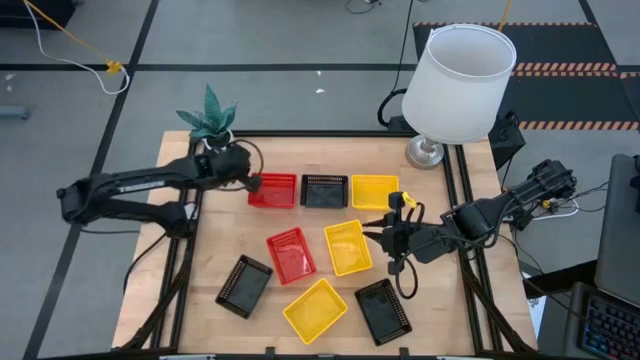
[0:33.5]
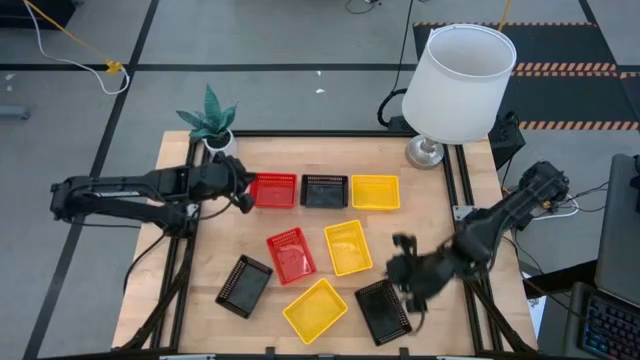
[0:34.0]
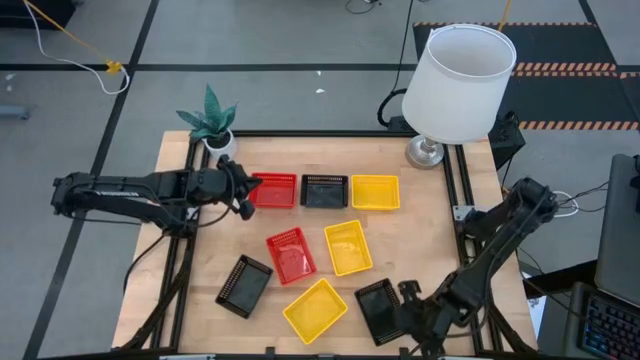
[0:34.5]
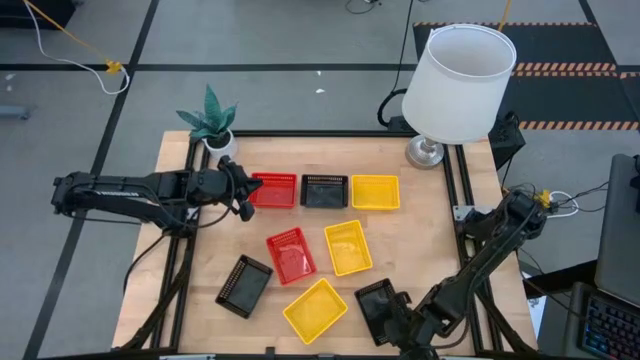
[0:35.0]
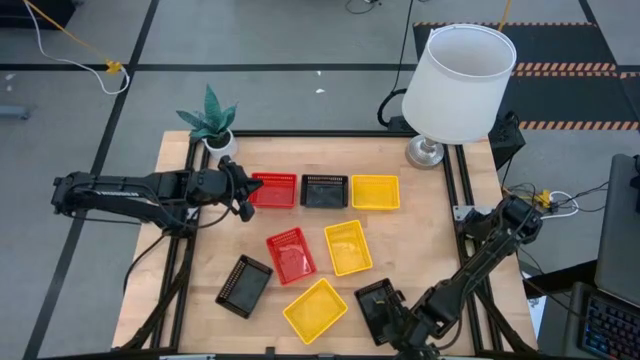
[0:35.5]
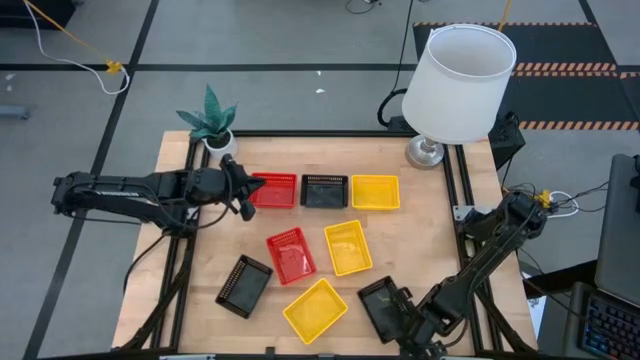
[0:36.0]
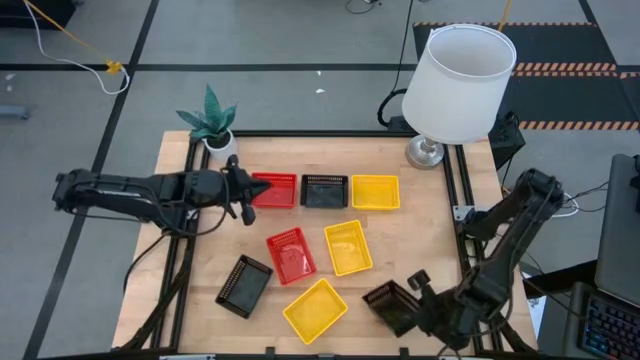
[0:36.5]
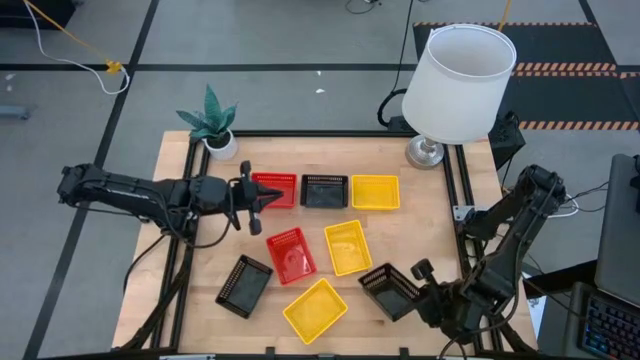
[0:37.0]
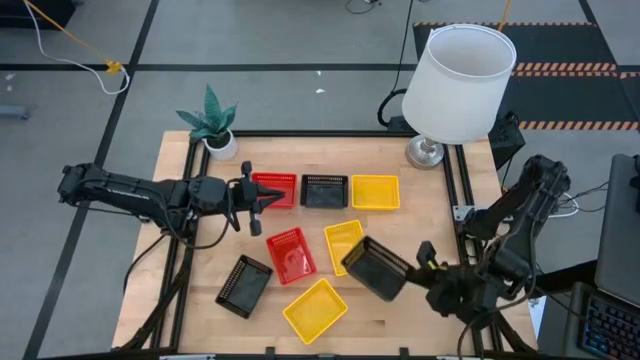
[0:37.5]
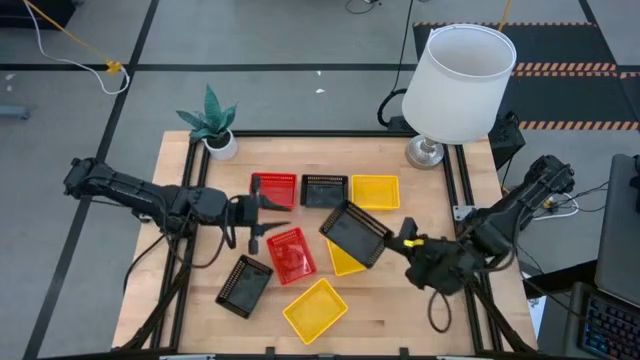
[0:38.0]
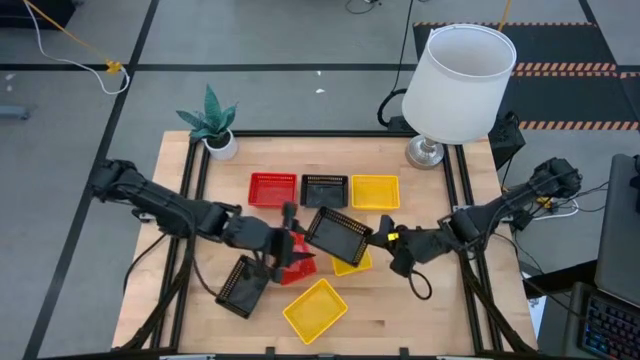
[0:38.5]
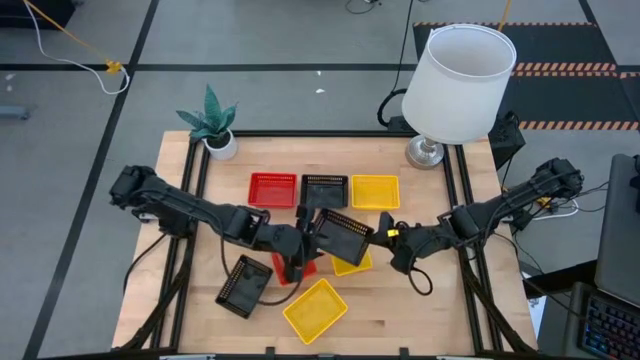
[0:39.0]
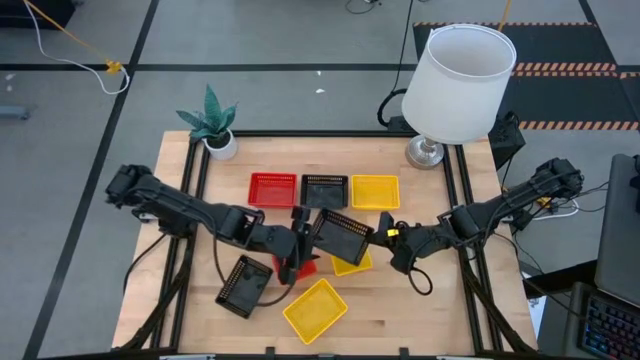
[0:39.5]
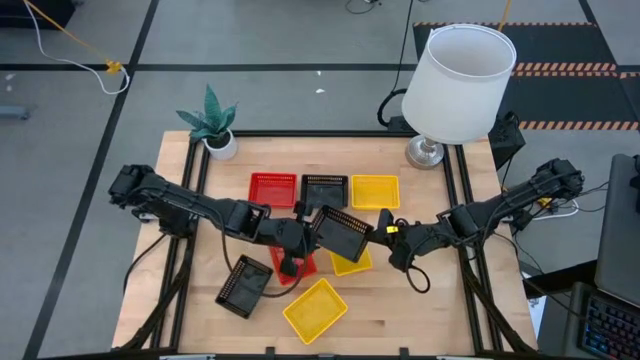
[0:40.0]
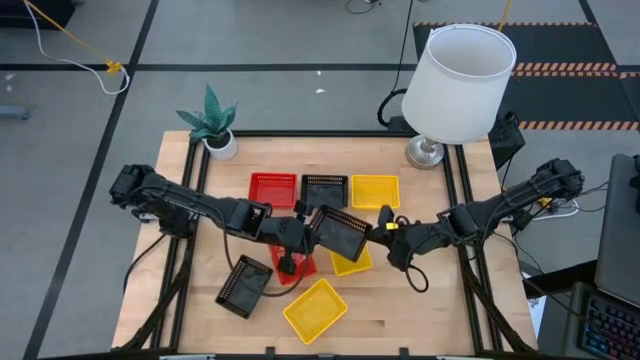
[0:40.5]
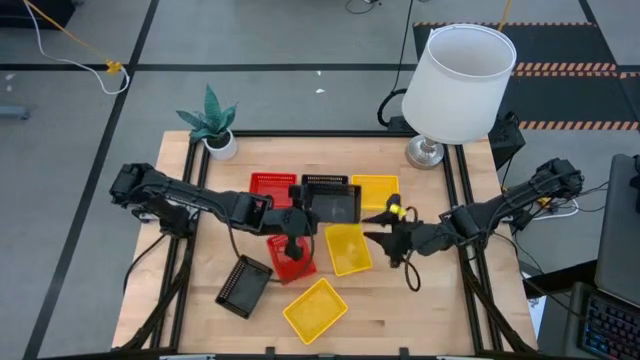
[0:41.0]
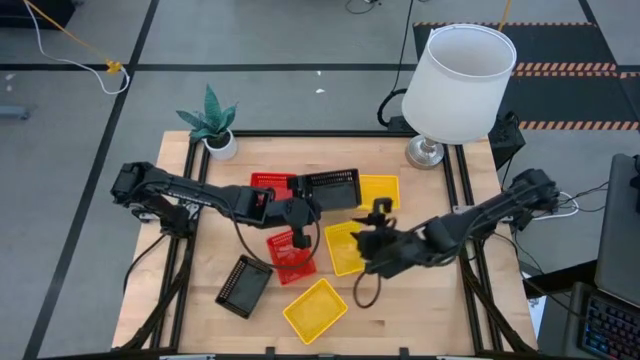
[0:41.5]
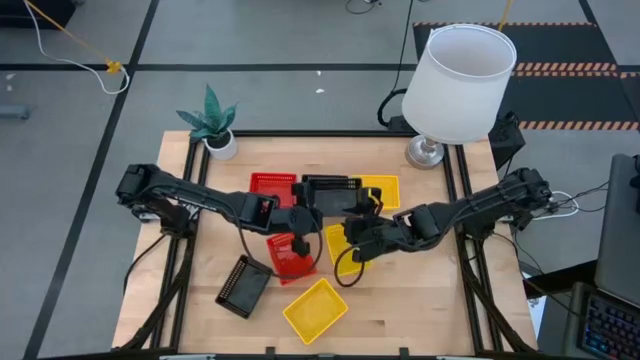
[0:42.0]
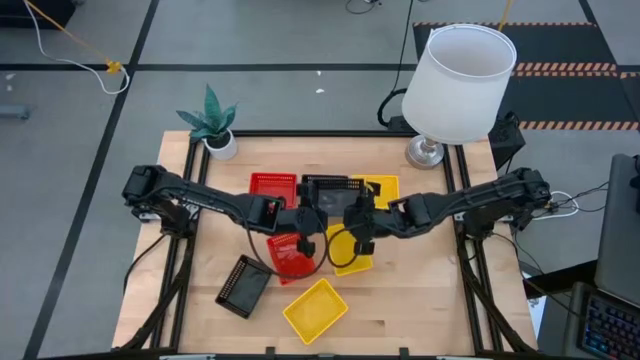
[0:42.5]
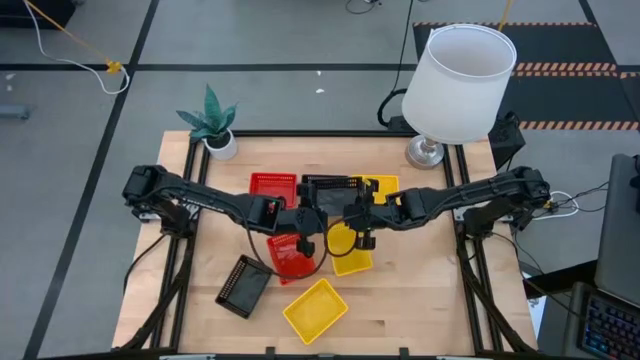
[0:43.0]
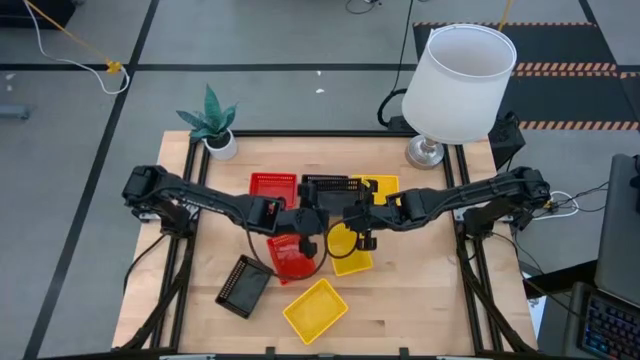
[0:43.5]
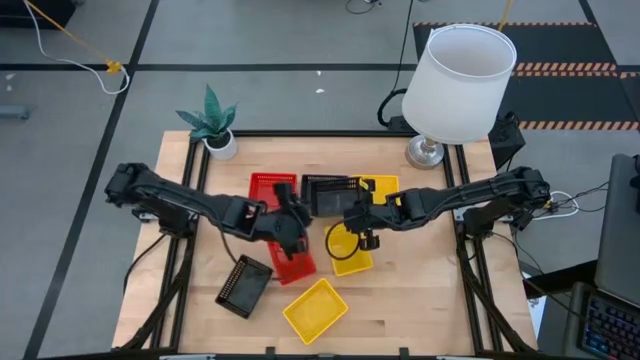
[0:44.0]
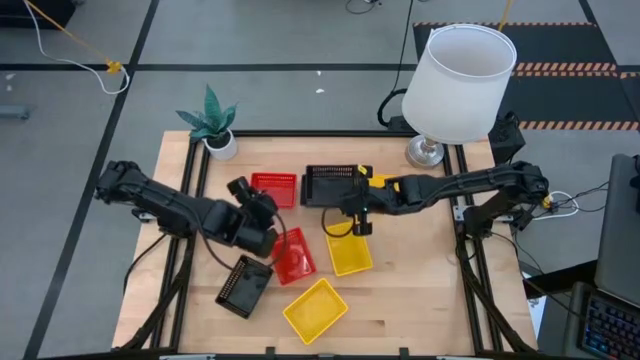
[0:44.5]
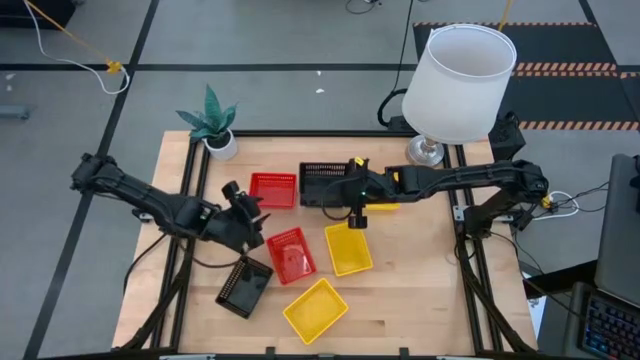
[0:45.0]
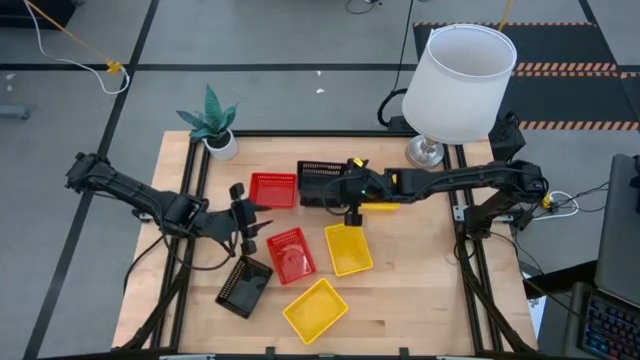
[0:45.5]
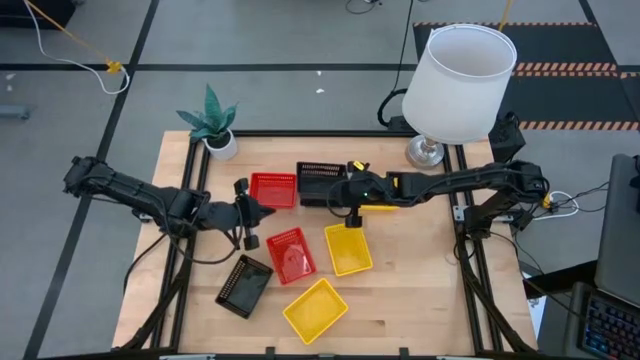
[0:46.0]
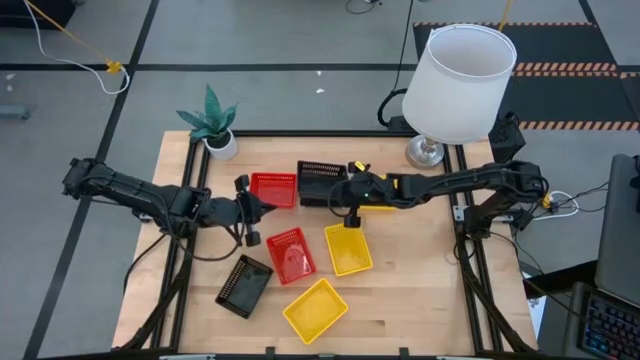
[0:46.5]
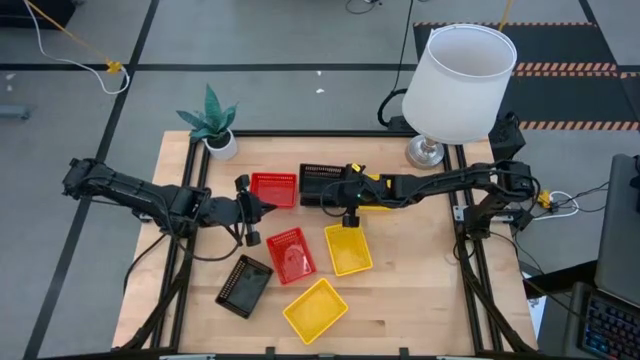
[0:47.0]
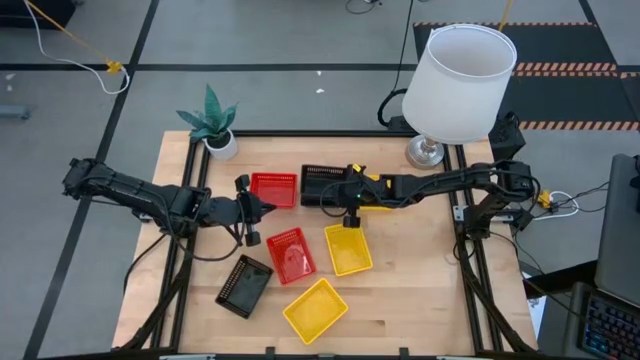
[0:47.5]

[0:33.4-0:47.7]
Stack the bottom right black bin on top of the top black bin
